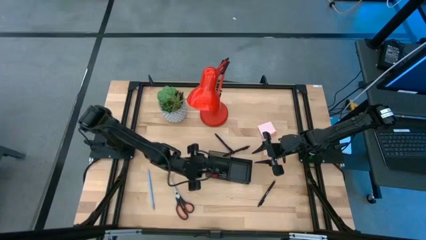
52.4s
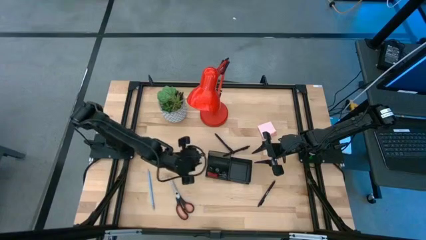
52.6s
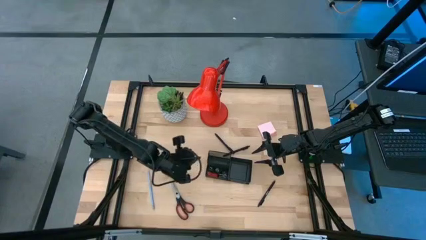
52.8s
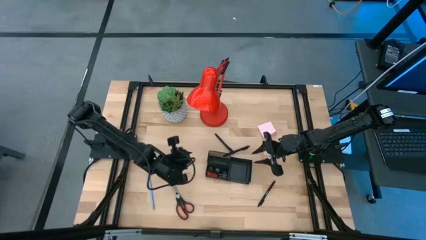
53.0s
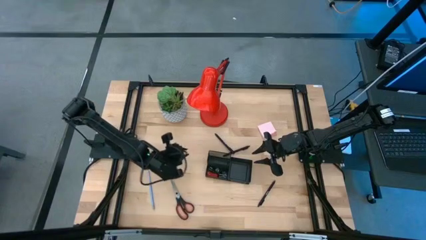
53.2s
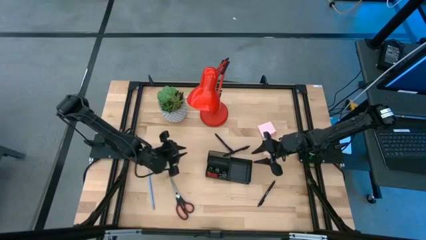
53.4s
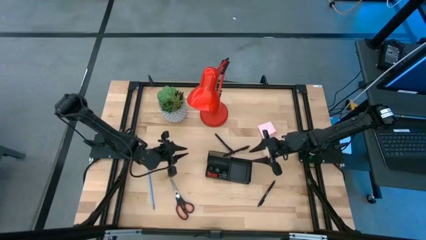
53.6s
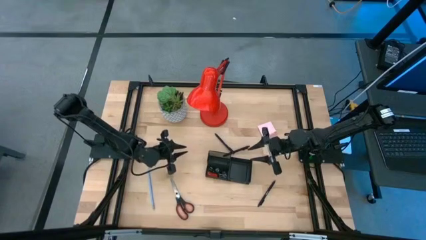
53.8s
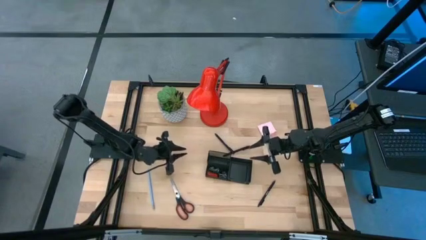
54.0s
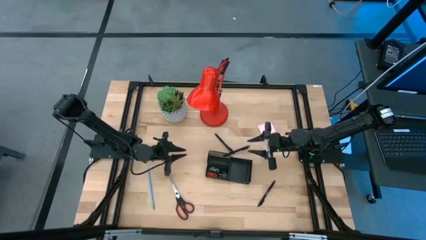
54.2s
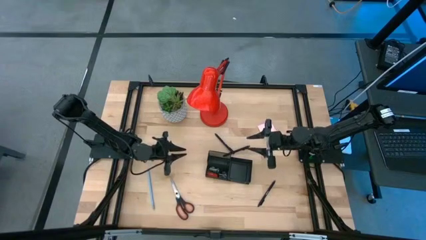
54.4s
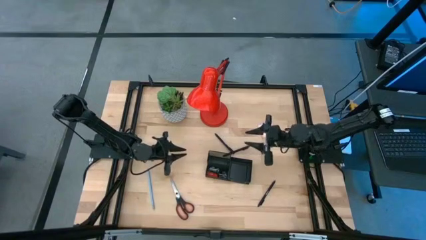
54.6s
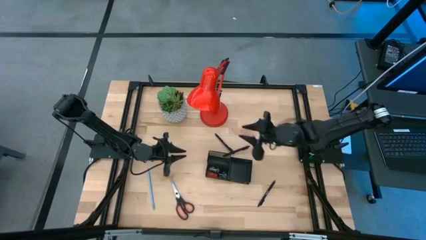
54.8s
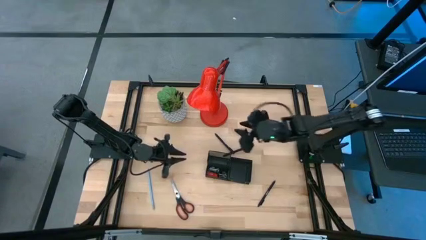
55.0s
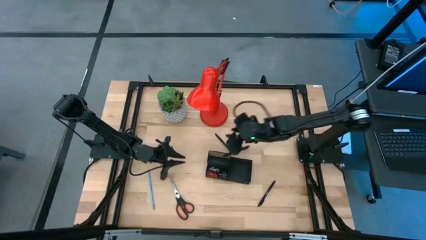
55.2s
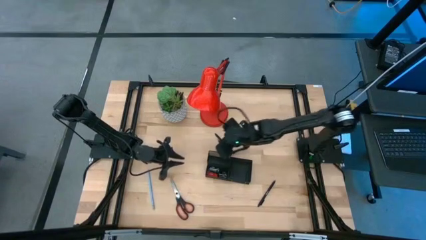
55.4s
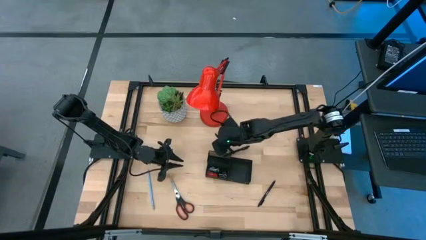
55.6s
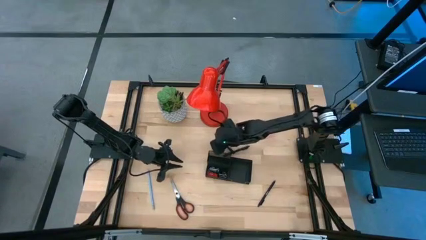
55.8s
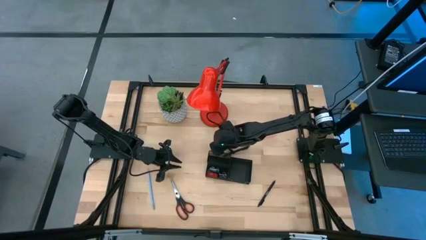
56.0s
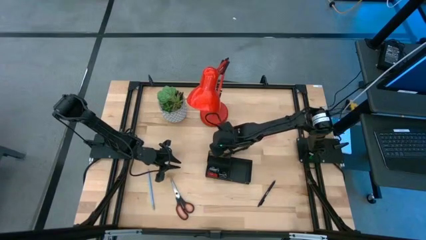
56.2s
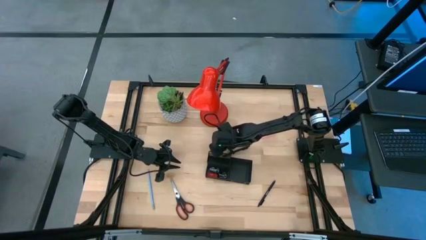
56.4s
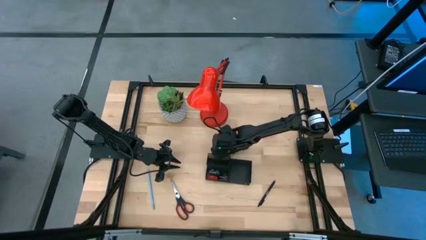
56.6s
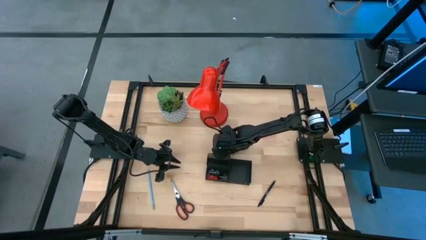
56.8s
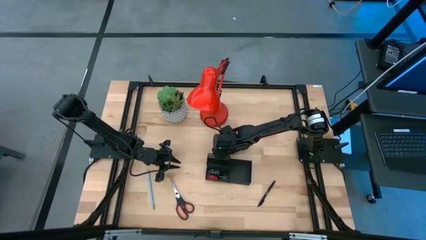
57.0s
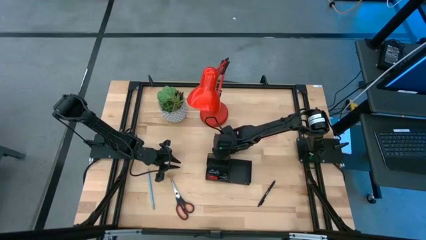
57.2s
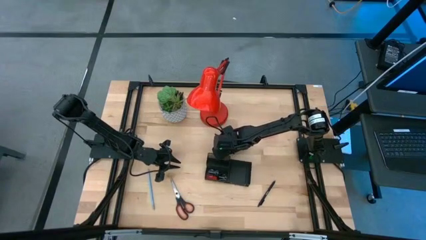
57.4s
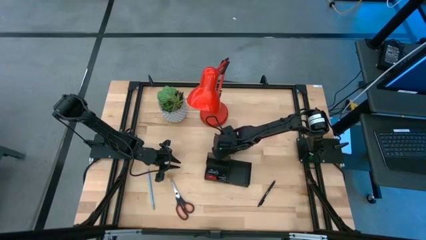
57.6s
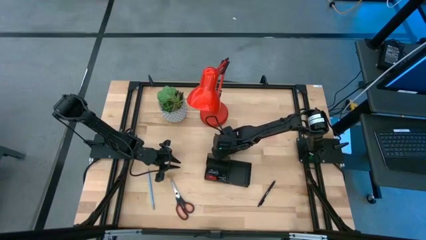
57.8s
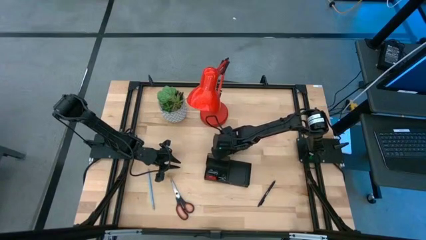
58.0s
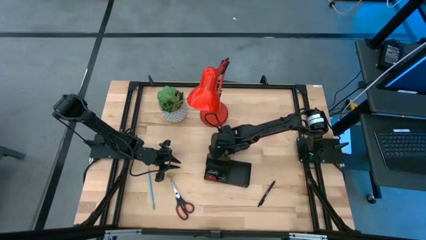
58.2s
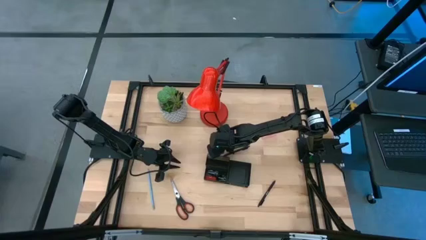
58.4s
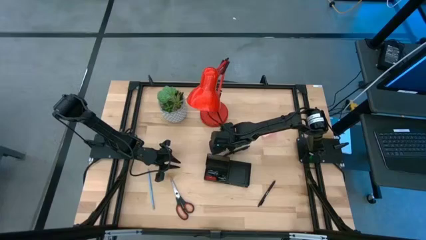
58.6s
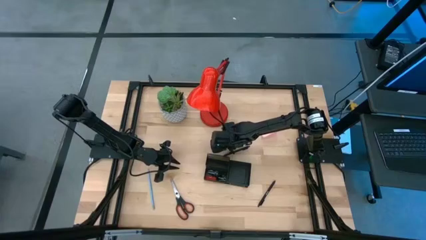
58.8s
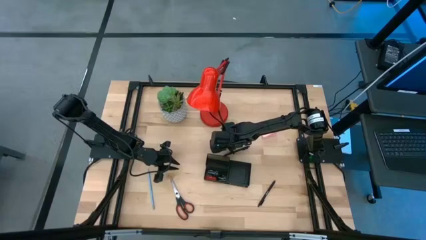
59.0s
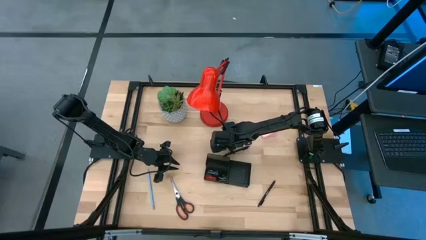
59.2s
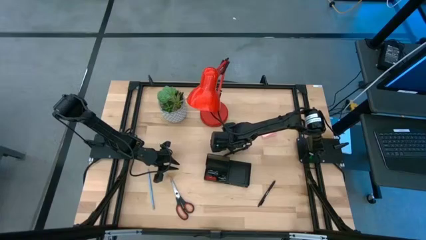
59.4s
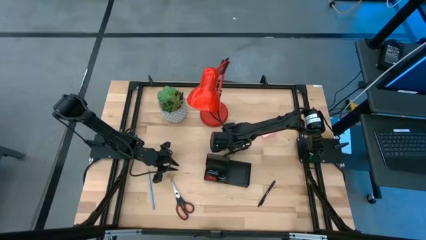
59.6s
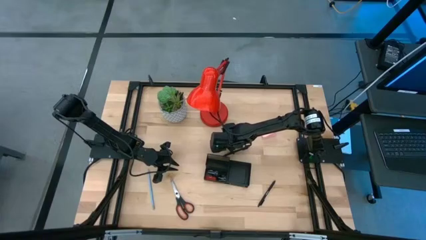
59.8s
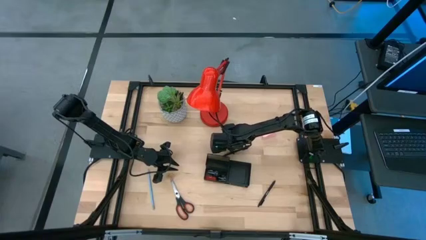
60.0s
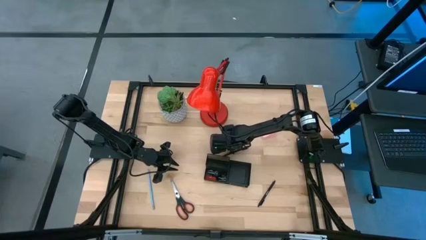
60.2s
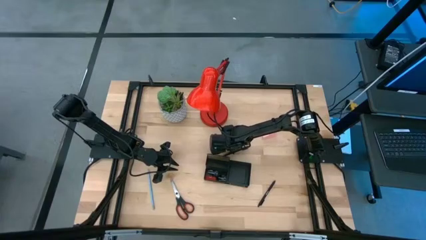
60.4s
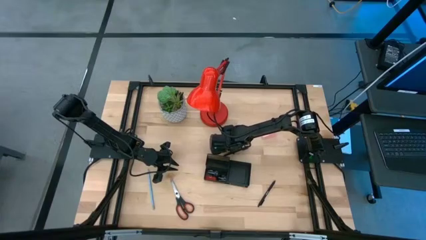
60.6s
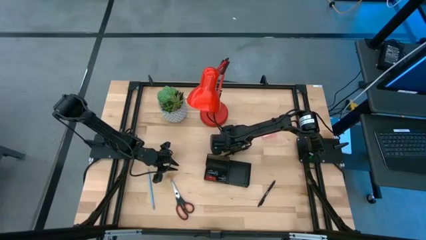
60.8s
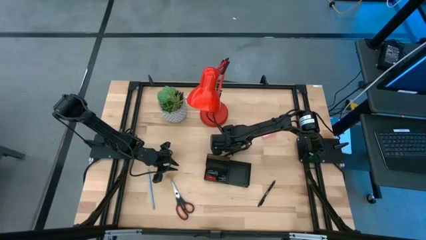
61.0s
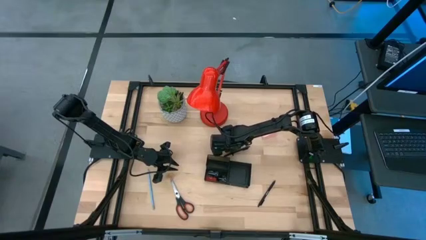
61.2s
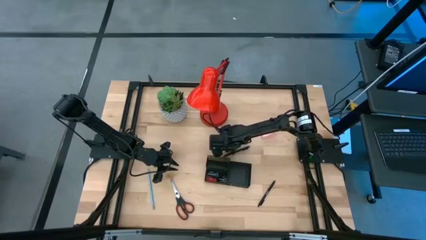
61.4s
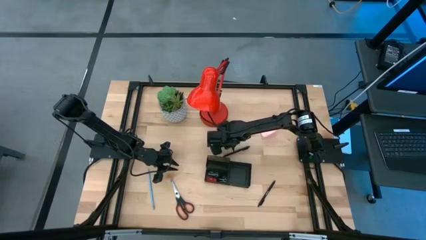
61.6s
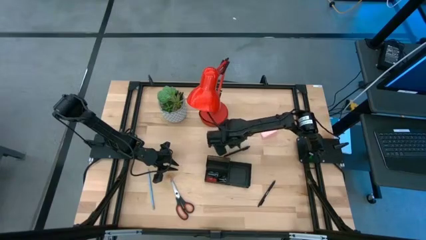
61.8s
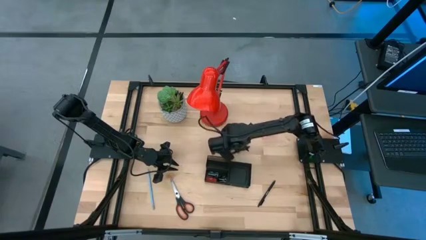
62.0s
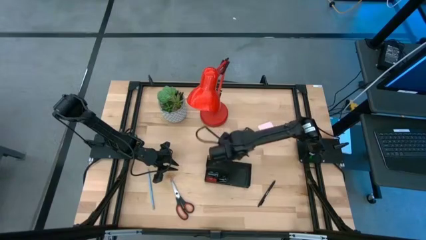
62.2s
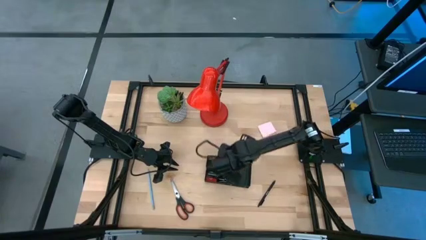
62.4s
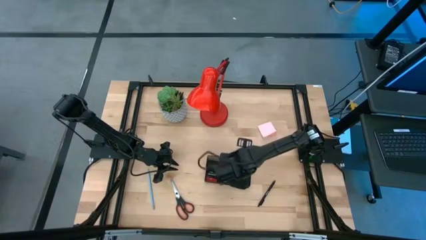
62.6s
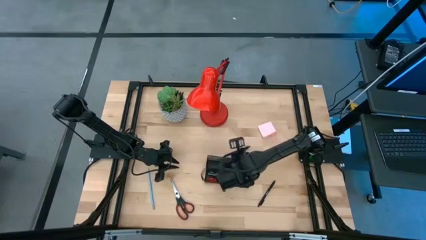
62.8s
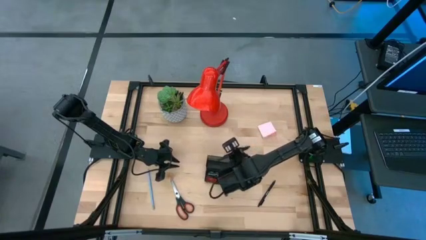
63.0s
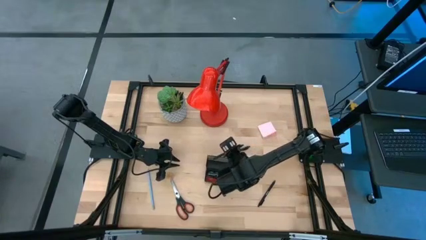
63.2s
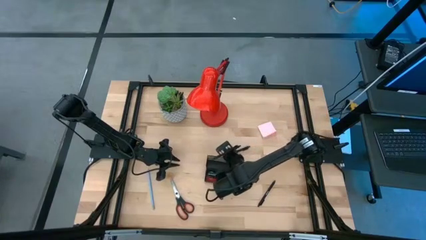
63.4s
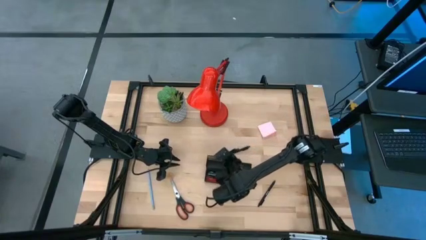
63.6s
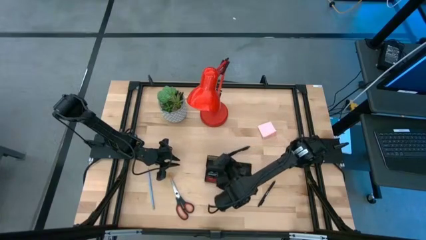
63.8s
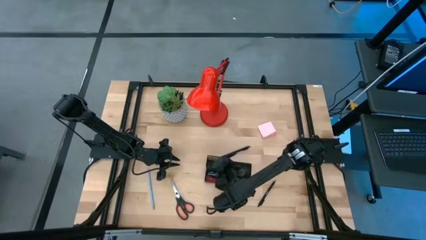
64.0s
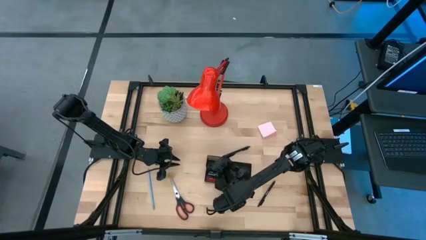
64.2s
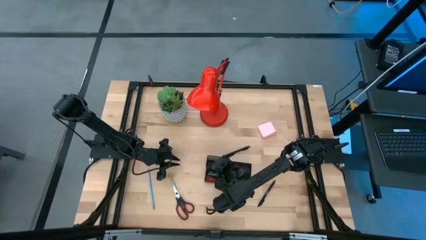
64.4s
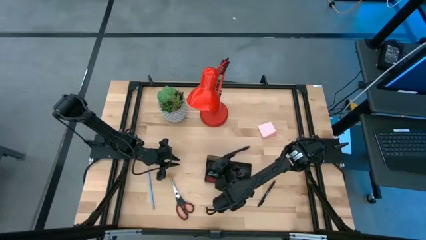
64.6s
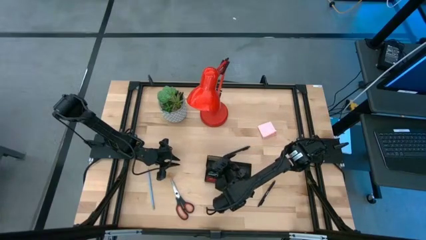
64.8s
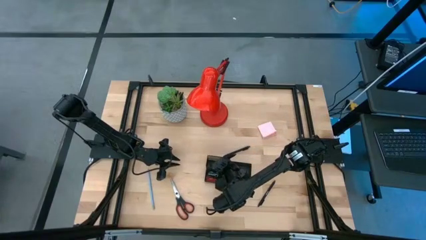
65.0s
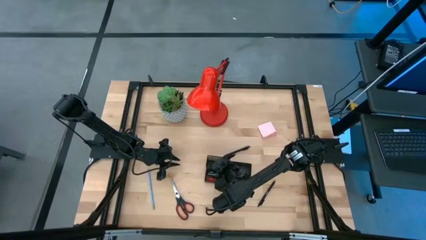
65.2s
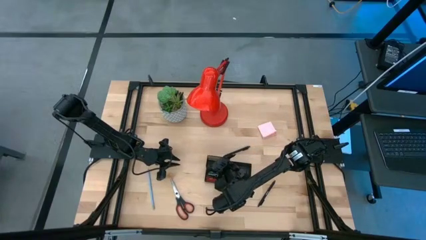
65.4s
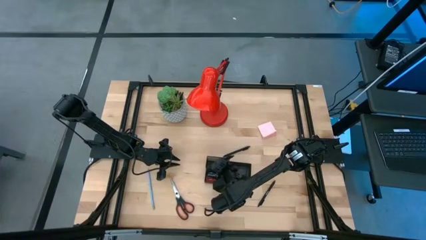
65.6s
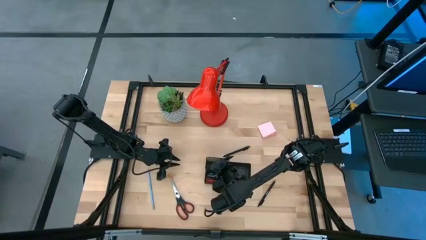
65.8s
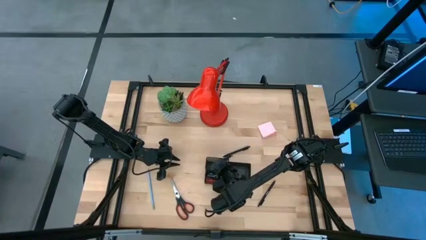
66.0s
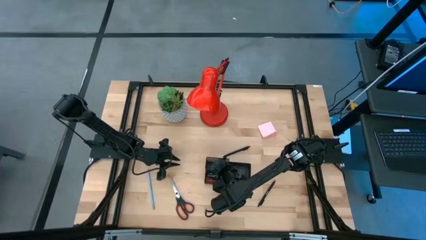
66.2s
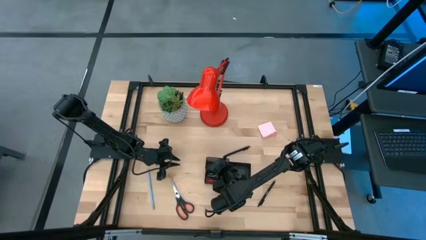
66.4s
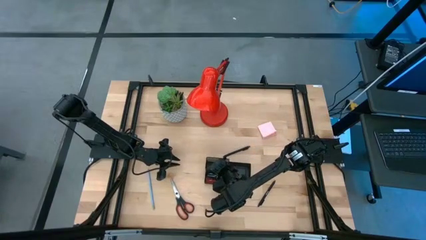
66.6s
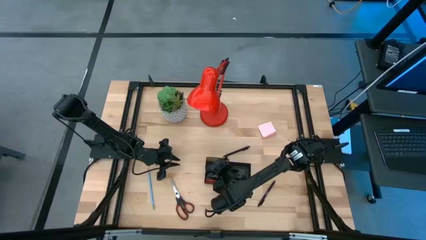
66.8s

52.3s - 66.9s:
Task: Pick and place office supplies into organizer
Put the top left black pen into the black desk organizer

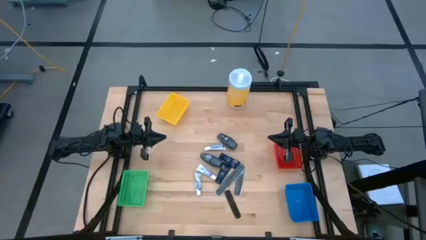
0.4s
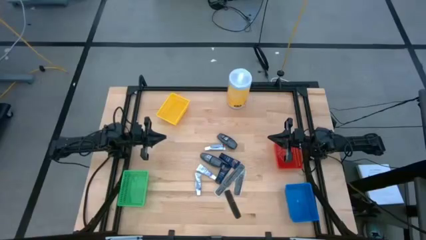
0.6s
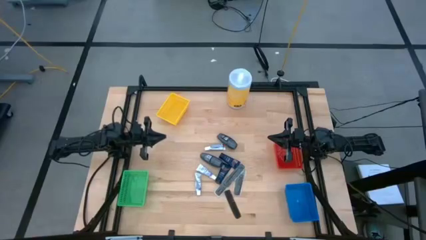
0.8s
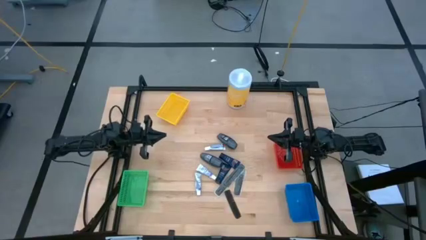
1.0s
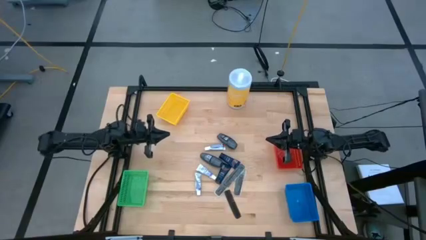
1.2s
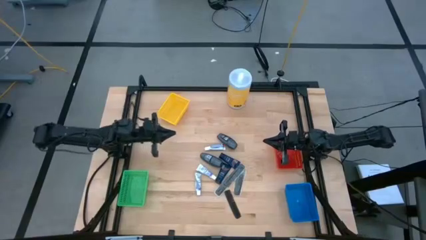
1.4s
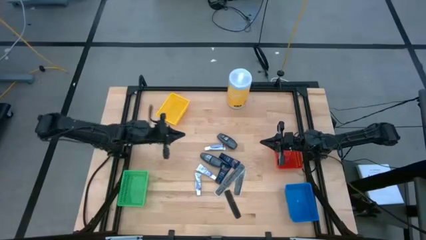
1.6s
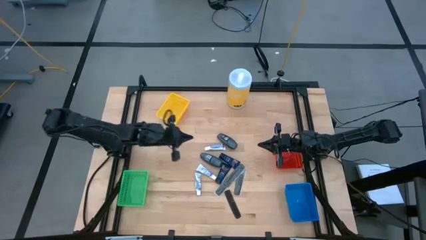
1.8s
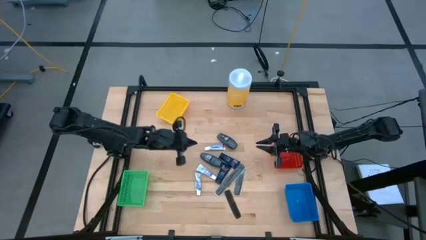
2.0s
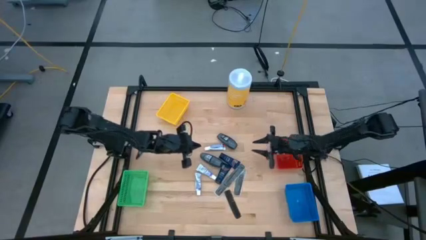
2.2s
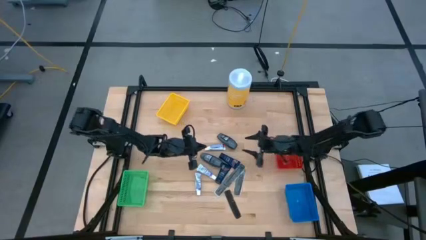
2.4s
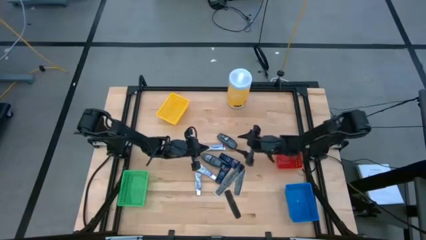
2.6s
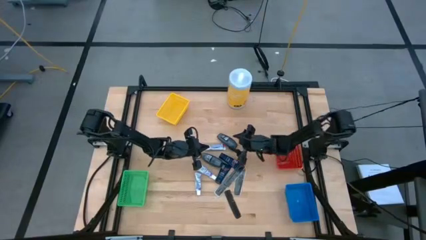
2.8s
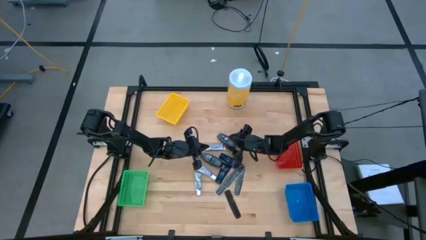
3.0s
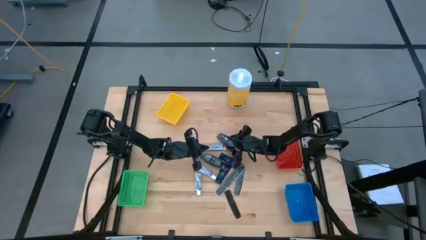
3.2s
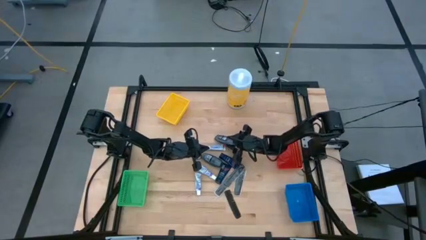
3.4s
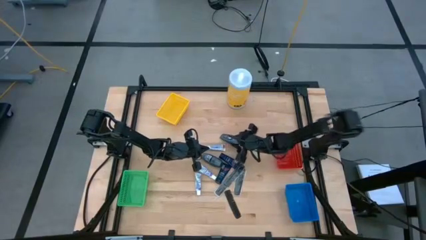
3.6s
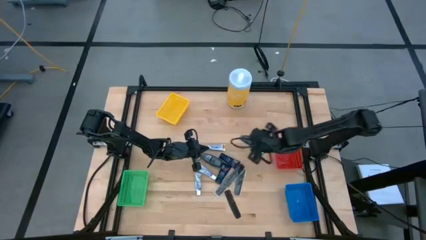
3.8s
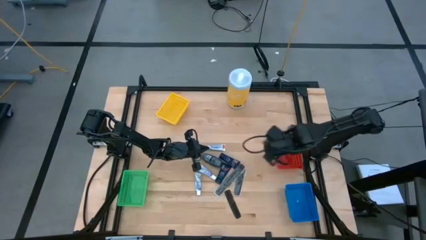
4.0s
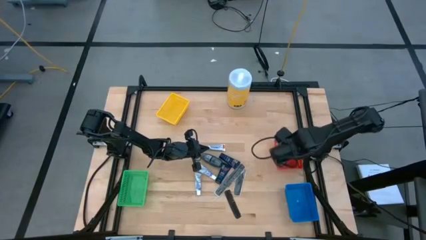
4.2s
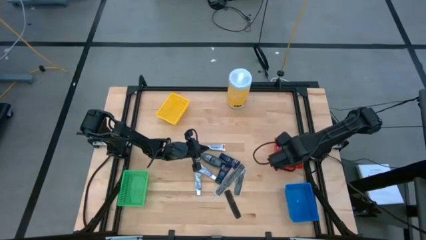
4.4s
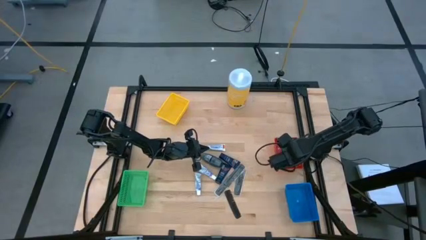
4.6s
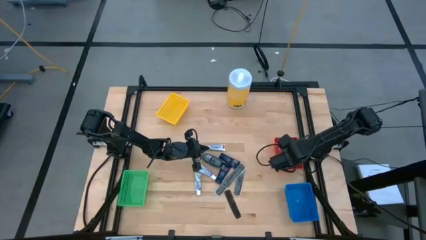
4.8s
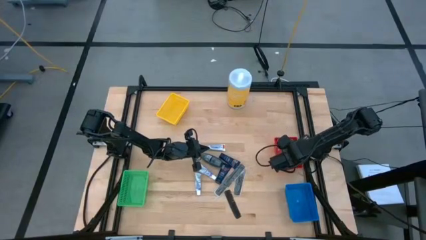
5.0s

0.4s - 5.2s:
Task: Pick & Place Travel size toiletries
Put the black deodorant into the red bin
